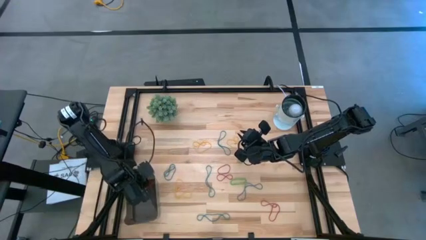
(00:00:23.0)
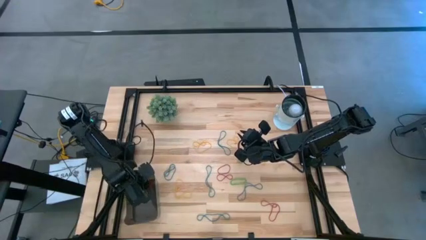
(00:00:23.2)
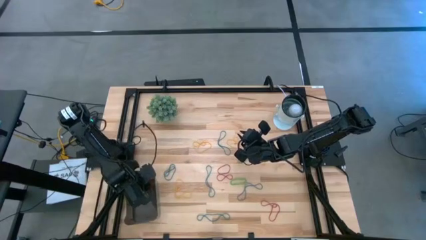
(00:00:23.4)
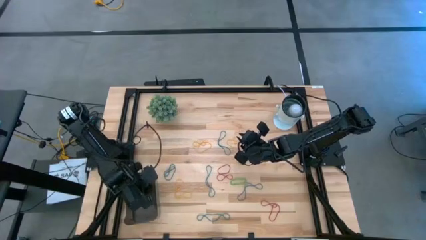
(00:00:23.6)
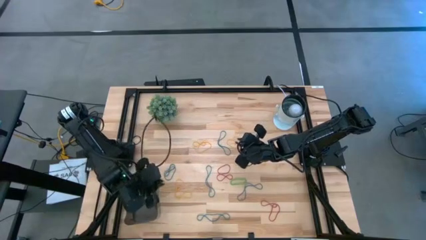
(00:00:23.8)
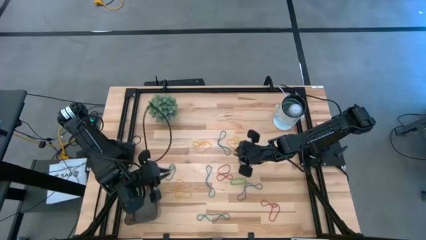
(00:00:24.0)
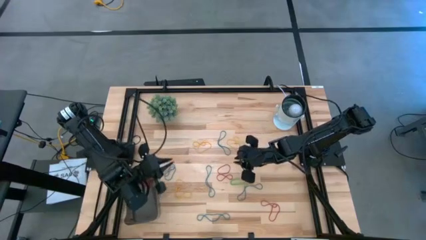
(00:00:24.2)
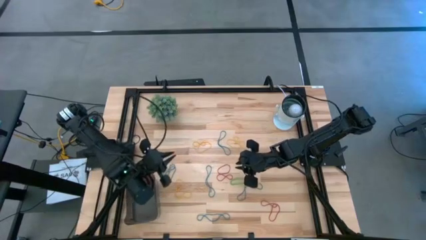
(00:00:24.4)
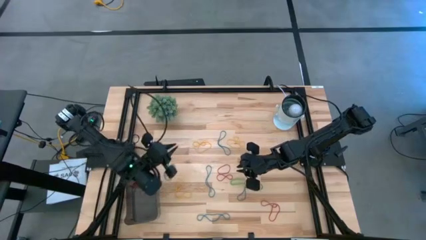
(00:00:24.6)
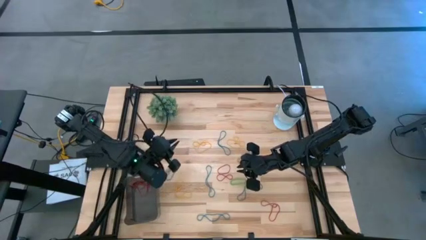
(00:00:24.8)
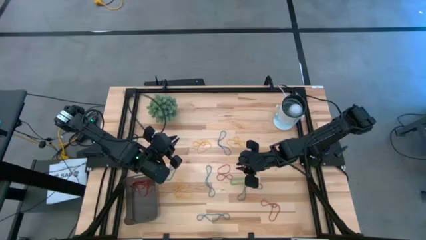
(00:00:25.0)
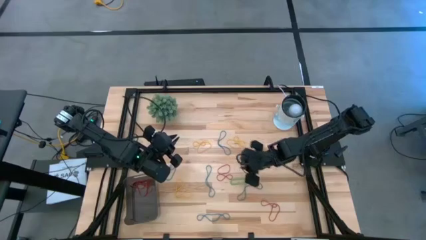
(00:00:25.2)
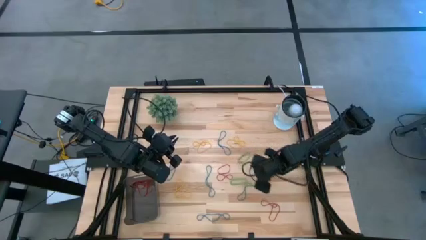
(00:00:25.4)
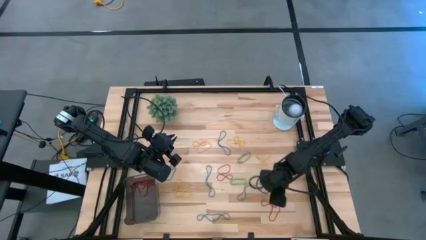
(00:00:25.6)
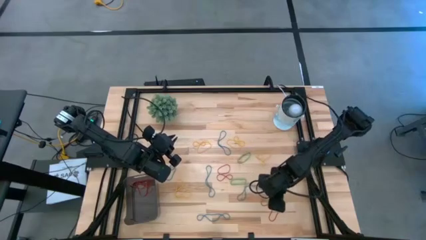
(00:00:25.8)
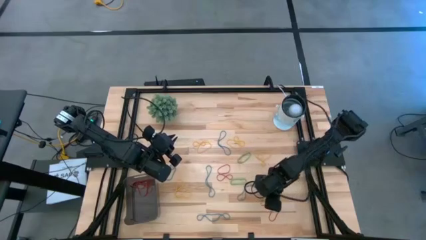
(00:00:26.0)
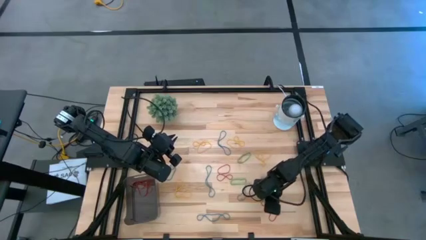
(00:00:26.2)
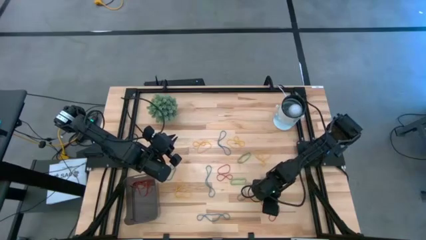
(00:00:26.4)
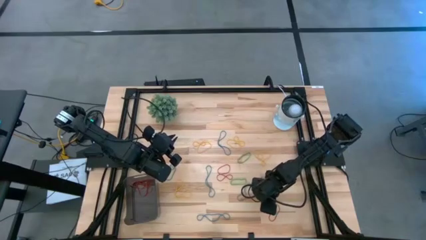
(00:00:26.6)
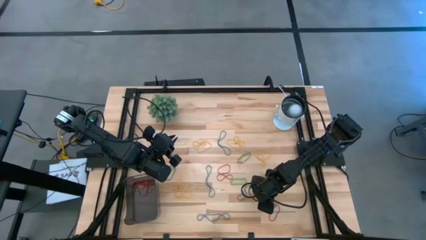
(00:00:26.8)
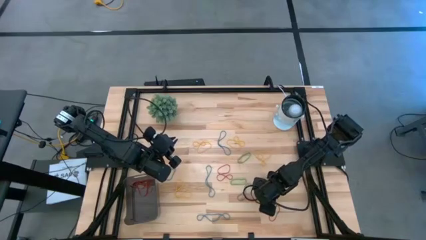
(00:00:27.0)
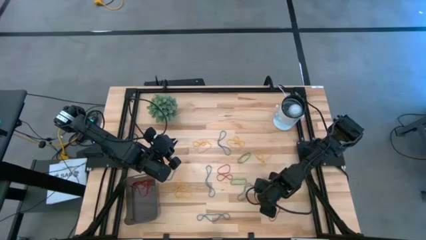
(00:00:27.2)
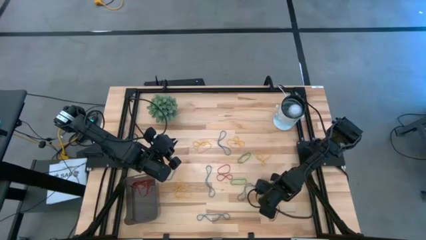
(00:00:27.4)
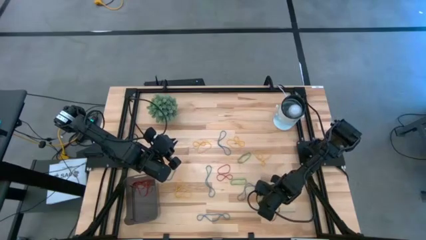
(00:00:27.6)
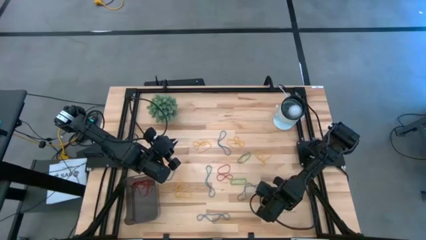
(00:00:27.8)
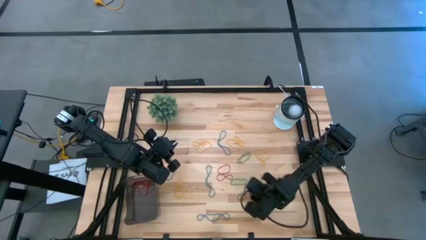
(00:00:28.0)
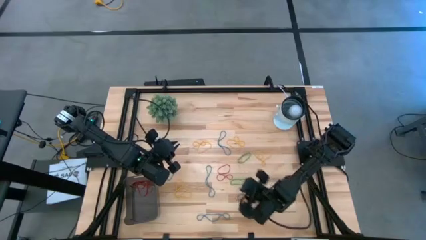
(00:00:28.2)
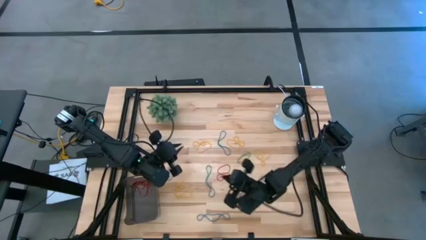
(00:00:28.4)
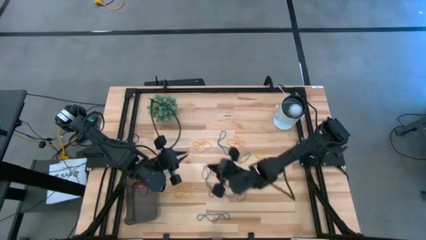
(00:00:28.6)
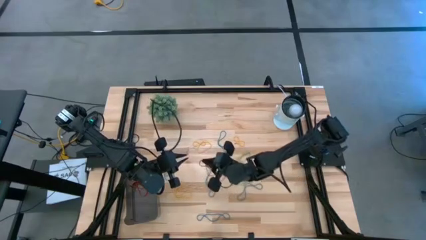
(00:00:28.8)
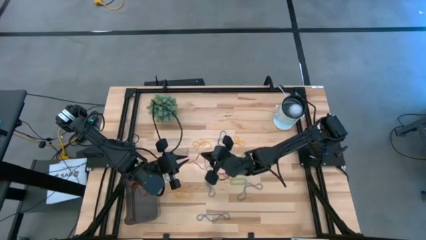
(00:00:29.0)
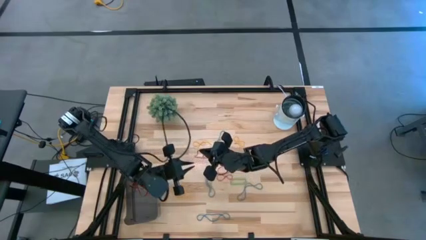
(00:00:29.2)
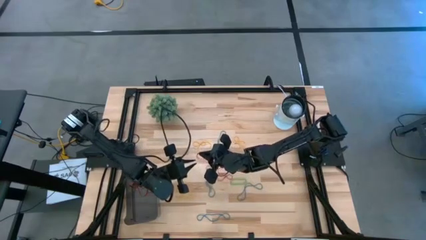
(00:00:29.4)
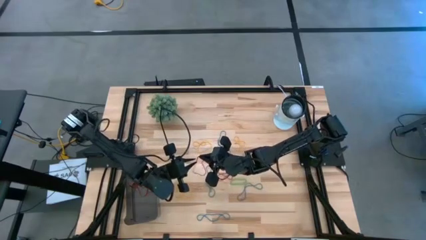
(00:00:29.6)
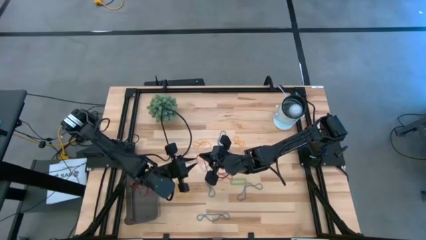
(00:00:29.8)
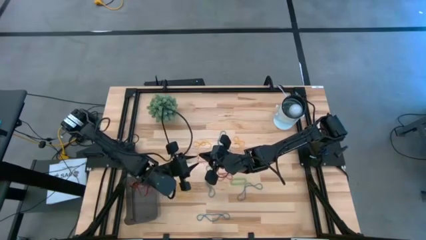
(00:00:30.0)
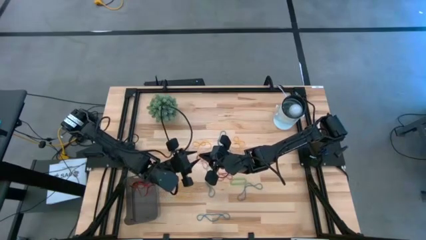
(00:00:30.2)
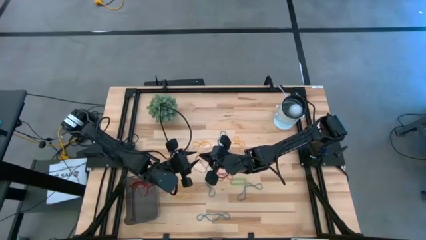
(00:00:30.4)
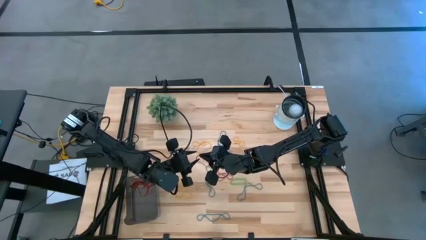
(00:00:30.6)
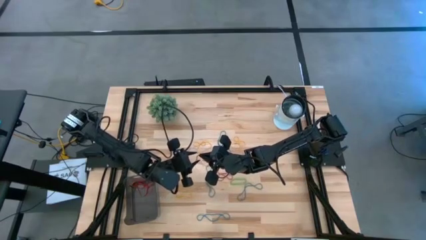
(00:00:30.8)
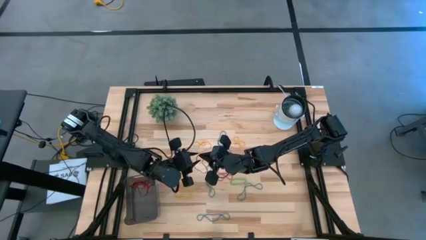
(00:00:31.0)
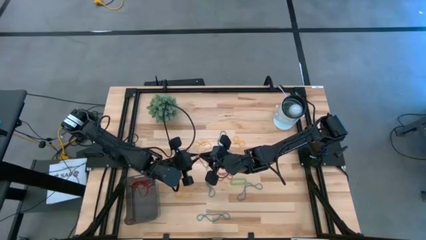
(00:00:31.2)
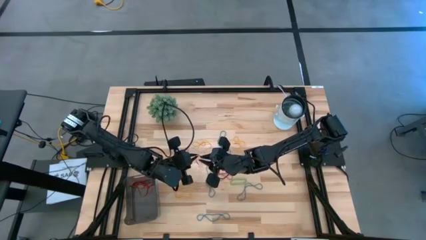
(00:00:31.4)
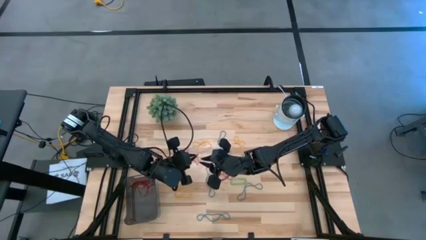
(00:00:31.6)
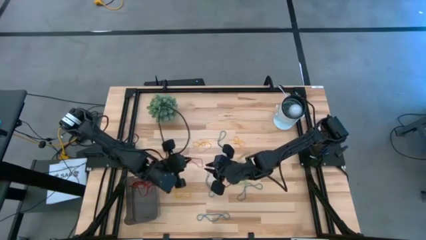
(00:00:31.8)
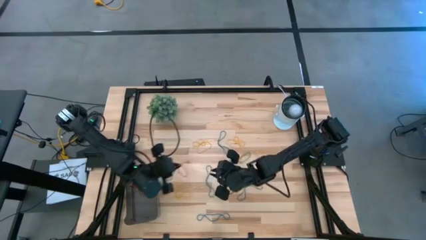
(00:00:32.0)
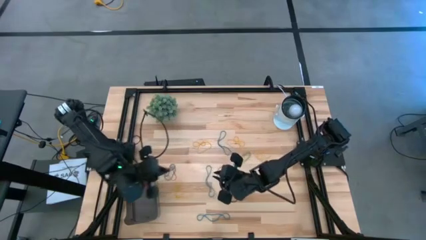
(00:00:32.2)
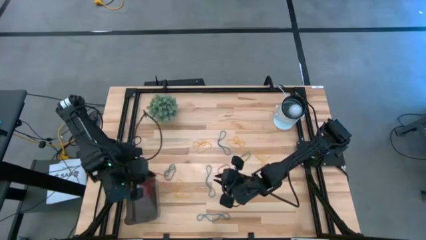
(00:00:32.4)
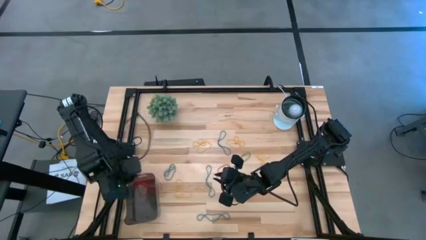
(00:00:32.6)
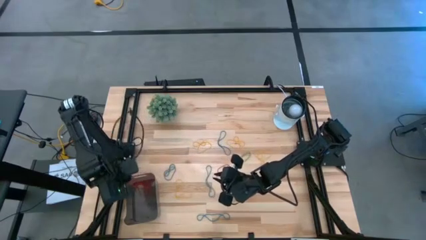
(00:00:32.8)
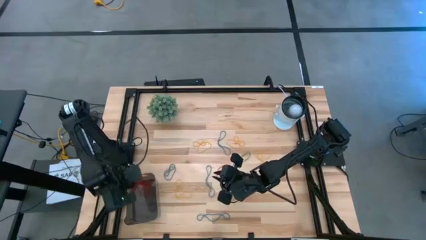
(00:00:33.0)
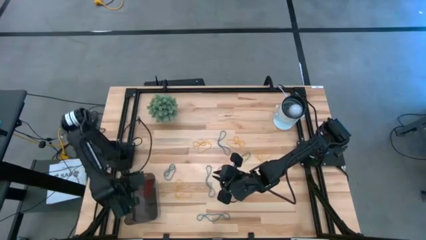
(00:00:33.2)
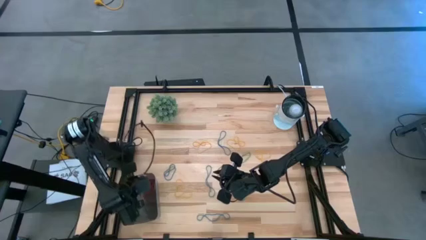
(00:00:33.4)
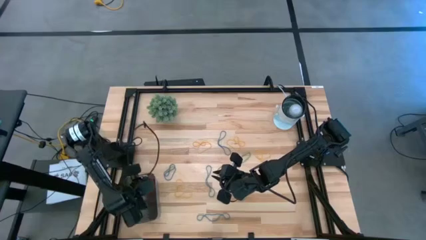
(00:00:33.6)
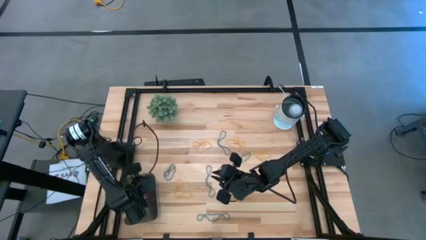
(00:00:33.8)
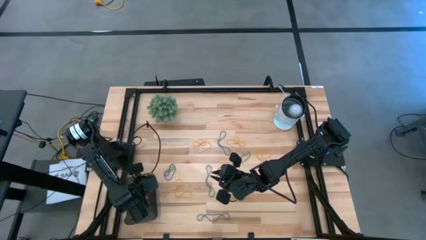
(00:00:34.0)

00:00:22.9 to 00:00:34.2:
Task: Pick and place items into bin
Put red rubber band into the black bin
